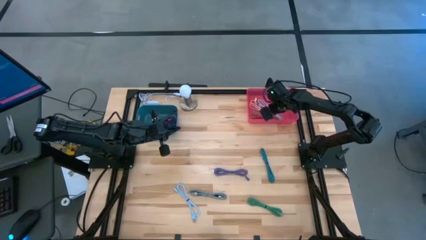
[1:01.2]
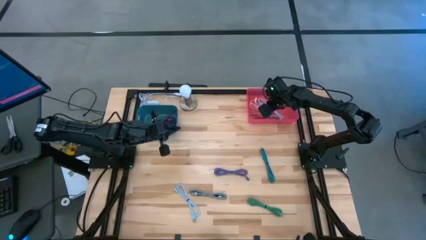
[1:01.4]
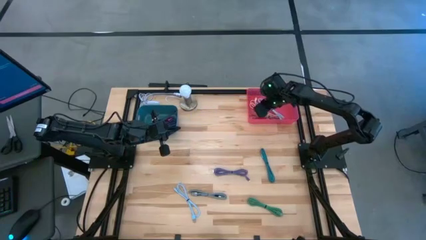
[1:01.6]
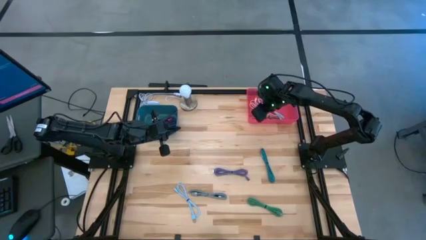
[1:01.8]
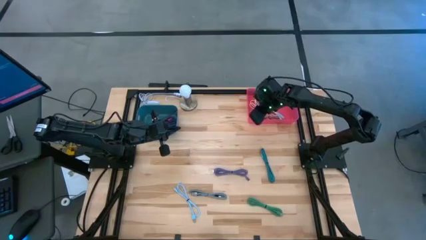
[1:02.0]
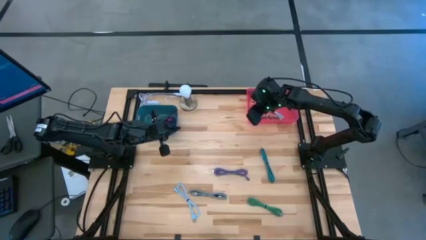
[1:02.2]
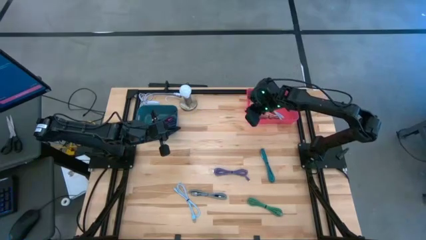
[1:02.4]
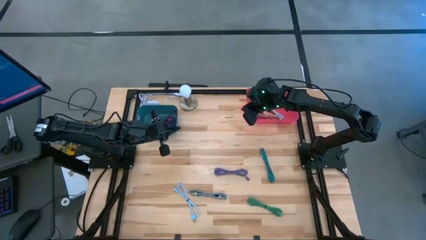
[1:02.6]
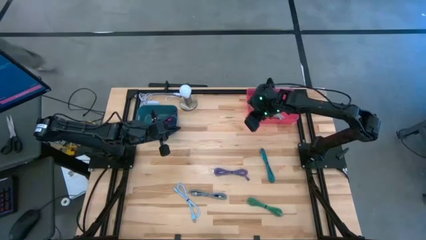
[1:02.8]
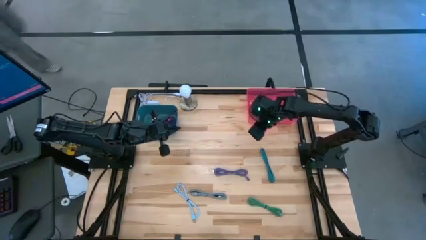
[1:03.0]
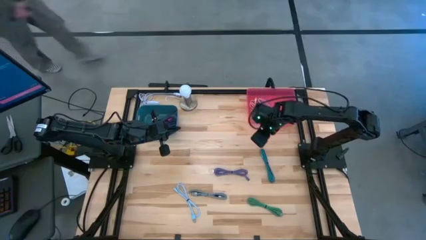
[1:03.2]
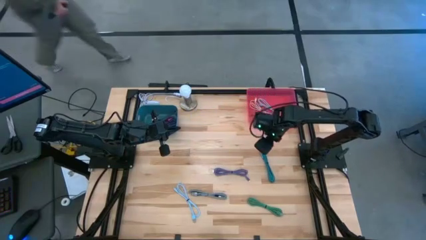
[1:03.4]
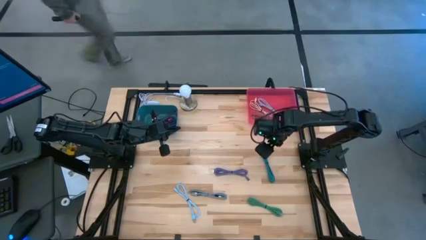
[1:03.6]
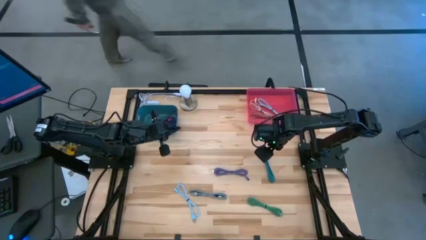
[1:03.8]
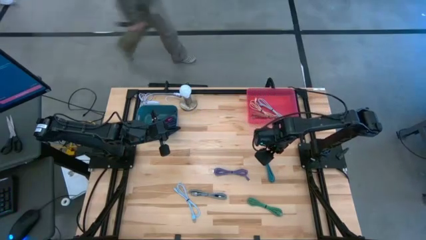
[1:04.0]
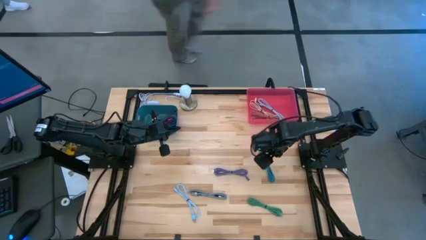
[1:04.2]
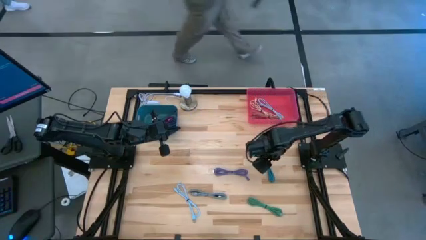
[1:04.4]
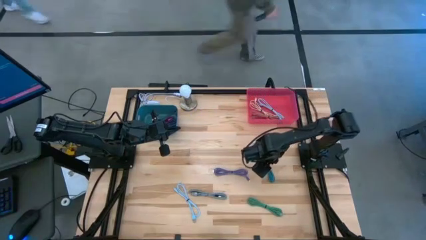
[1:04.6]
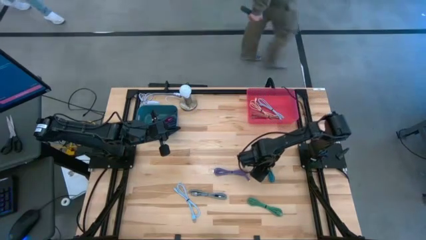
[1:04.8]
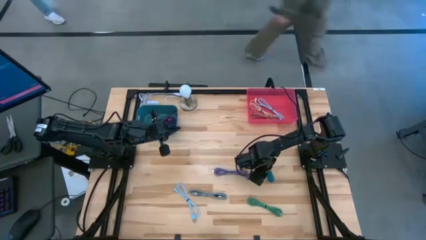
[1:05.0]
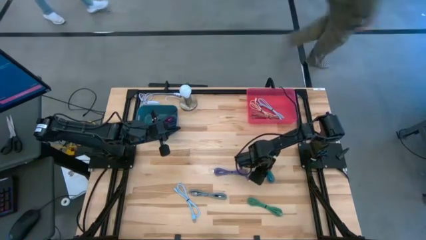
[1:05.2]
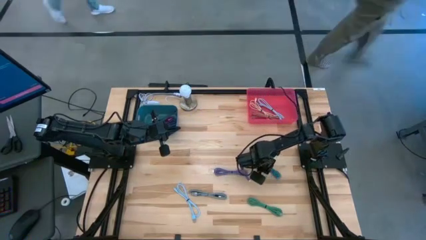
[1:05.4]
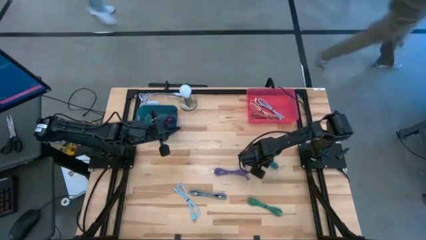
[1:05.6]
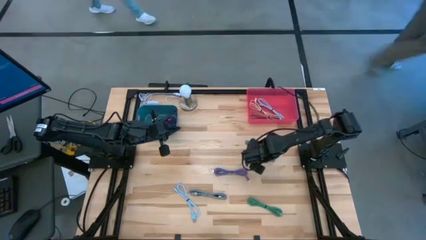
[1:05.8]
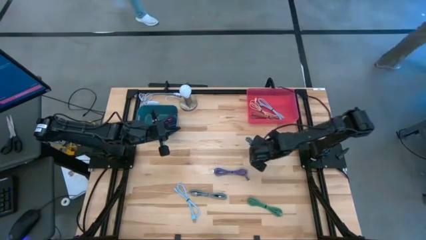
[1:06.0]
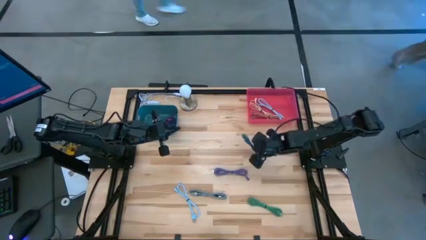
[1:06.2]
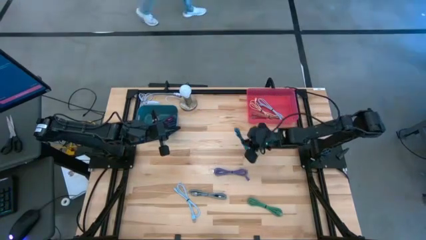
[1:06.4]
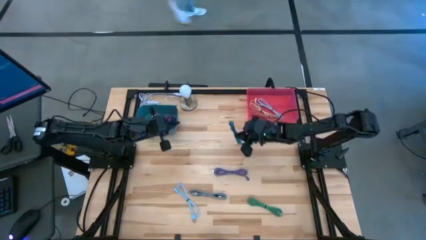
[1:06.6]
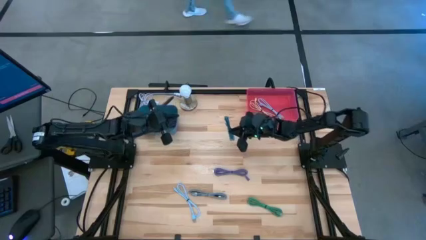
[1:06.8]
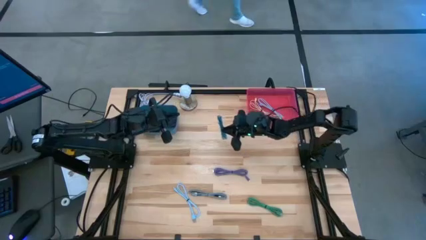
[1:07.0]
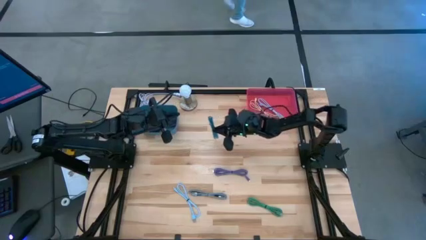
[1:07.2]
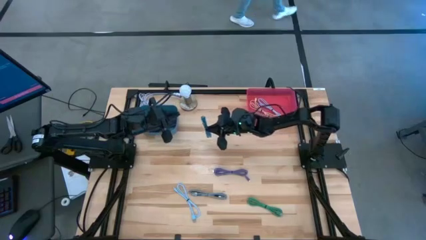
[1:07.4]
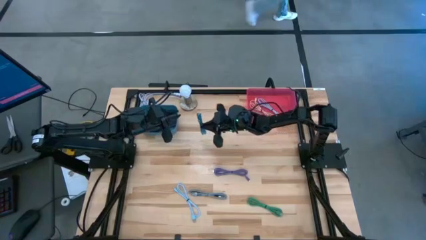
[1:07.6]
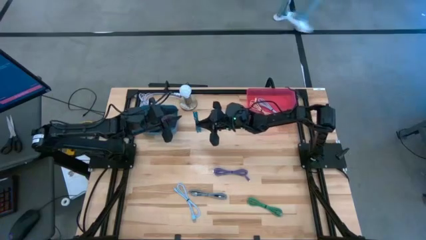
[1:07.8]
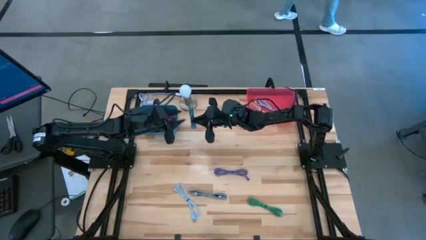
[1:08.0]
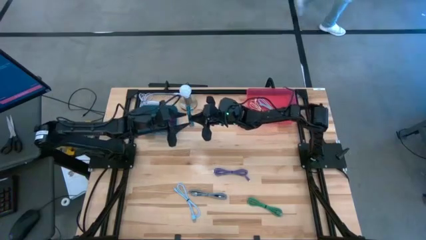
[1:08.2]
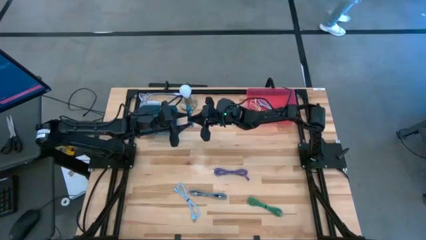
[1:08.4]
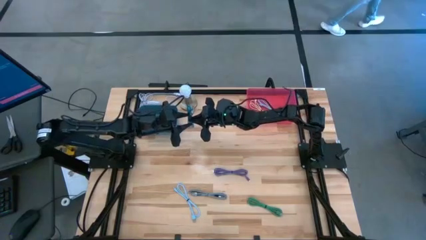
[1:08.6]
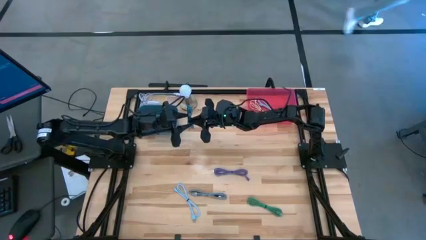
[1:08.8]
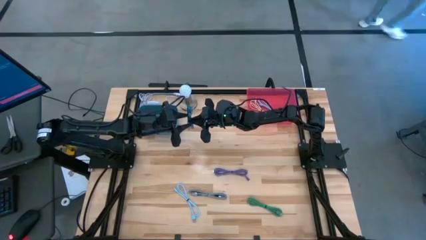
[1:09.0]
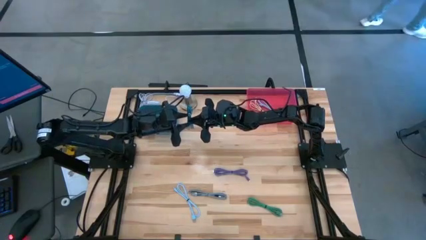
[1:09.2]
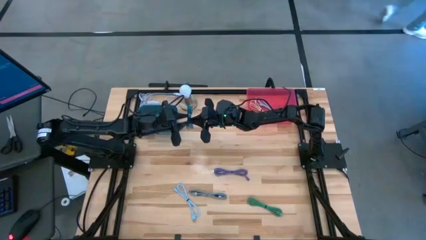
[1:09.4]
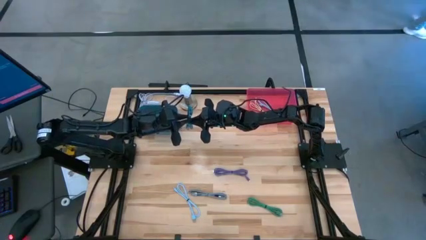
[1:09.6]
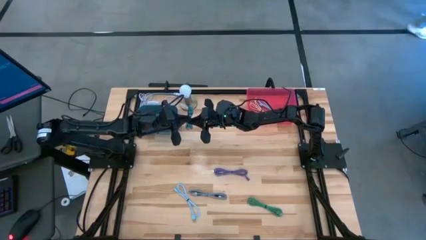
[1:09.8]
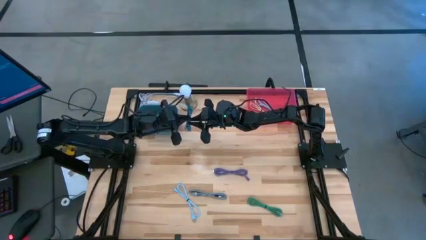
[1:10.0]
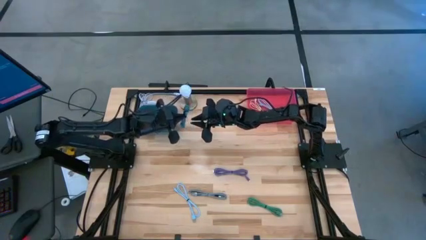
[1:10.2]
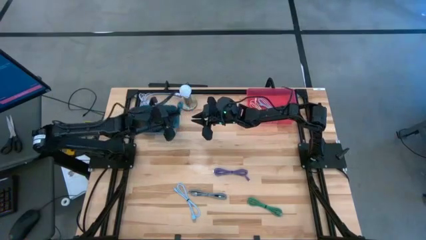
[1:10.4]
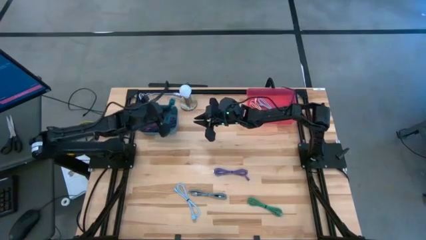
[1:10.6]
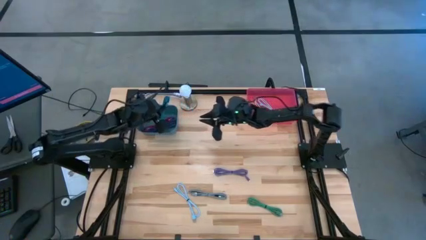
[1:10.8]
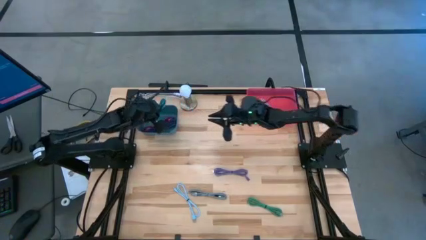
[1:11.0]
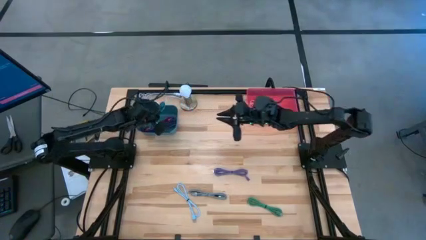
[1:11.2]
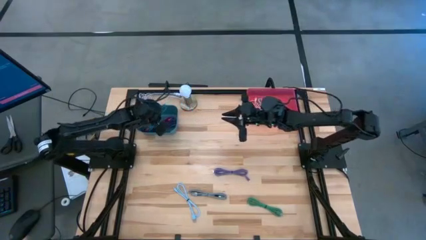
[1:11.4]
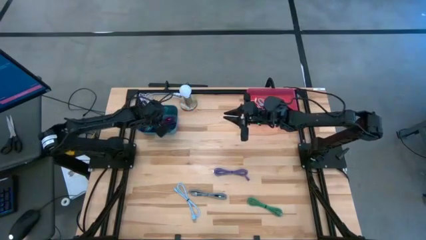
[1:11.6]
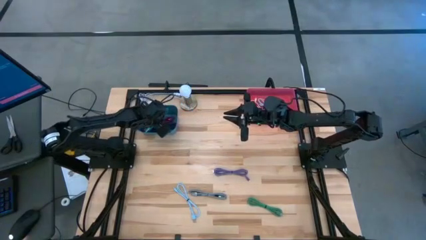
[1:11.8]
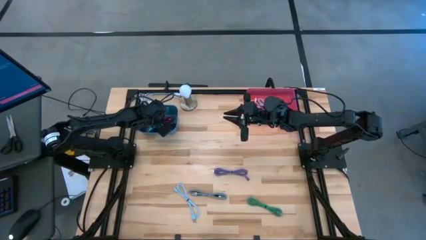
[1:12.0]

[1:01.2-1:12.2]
Task: Pick & Place USB Port
Put the striped blue and black charger cable into the blue bin

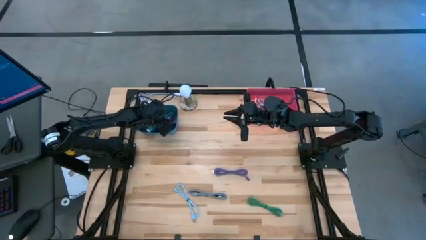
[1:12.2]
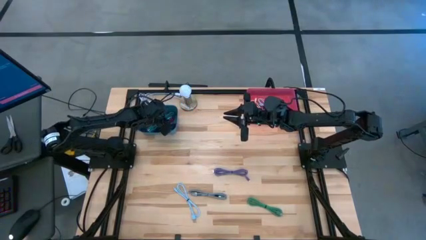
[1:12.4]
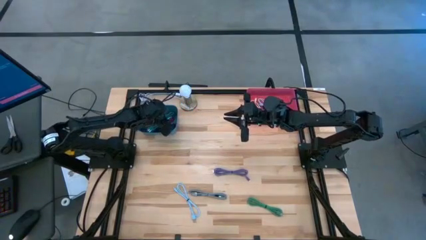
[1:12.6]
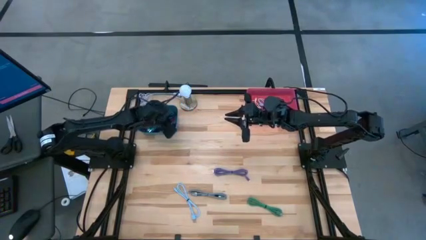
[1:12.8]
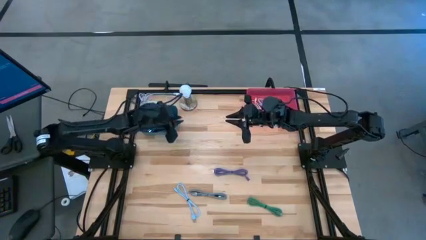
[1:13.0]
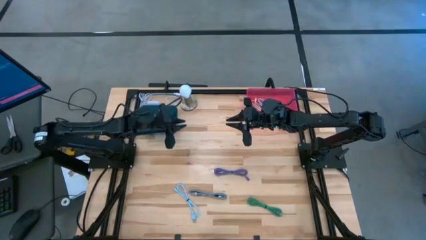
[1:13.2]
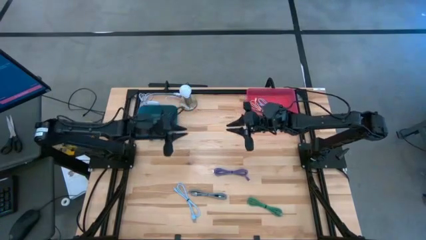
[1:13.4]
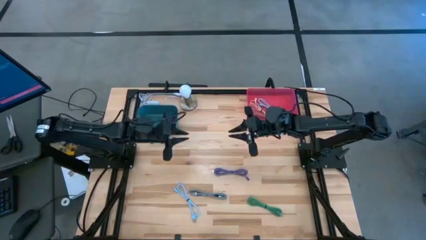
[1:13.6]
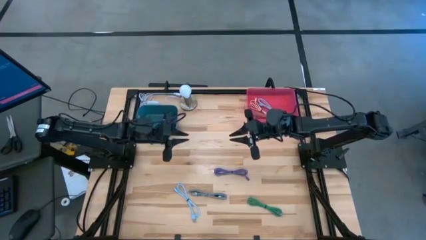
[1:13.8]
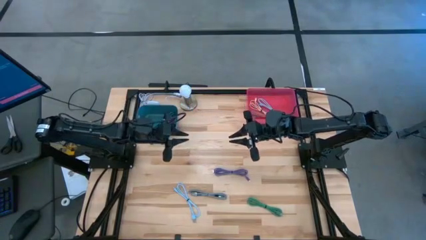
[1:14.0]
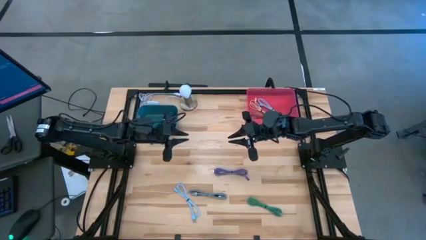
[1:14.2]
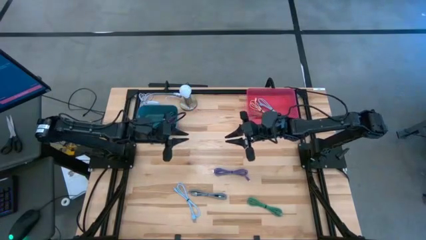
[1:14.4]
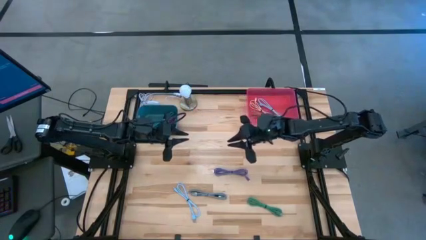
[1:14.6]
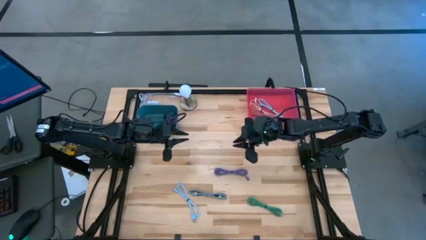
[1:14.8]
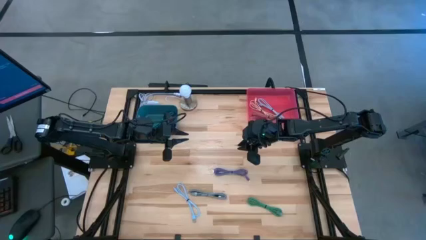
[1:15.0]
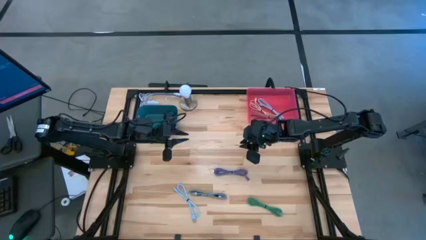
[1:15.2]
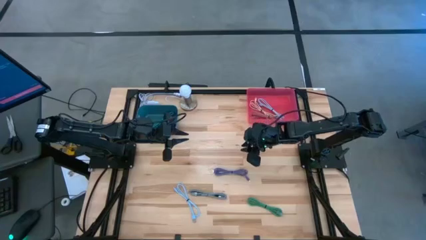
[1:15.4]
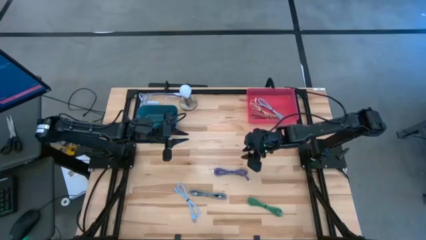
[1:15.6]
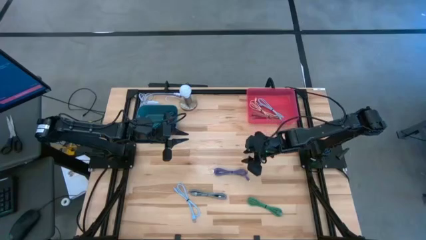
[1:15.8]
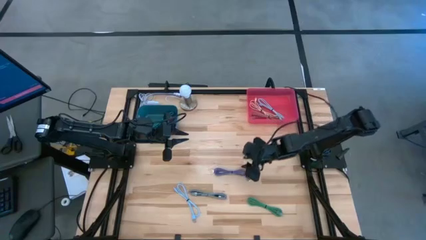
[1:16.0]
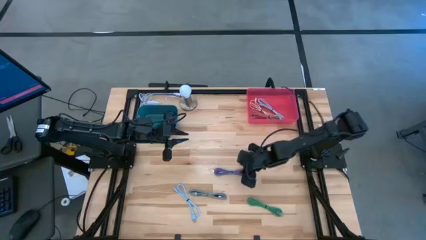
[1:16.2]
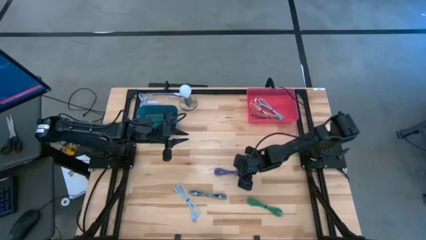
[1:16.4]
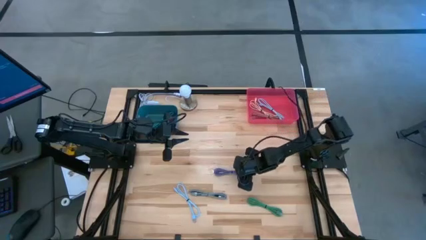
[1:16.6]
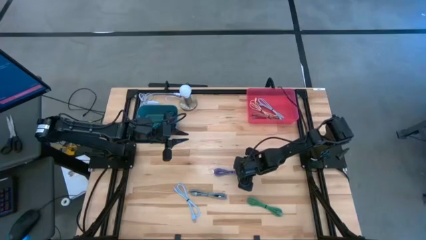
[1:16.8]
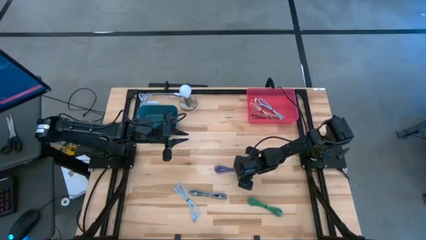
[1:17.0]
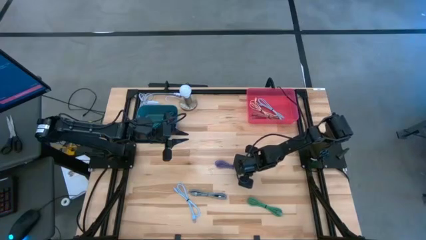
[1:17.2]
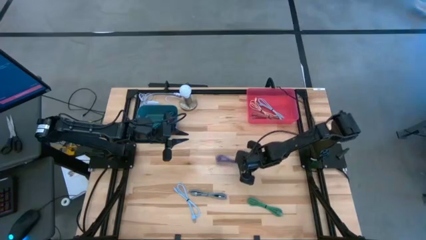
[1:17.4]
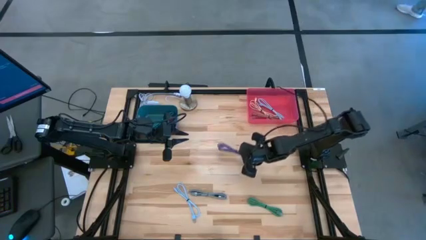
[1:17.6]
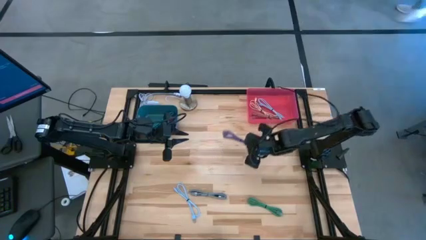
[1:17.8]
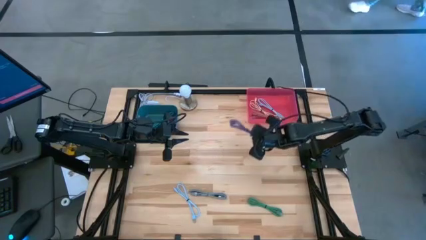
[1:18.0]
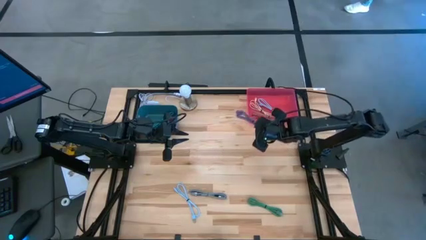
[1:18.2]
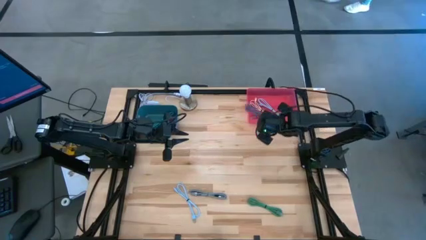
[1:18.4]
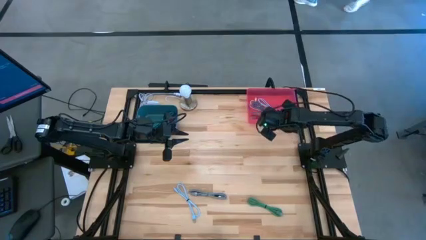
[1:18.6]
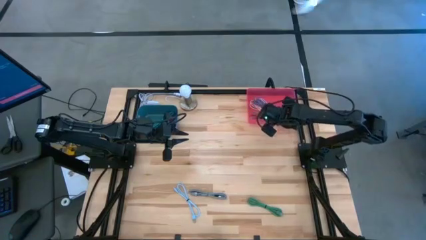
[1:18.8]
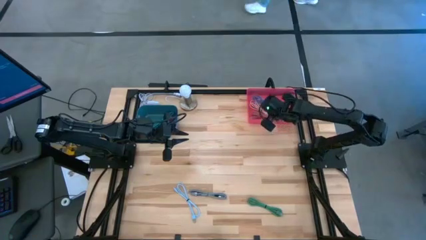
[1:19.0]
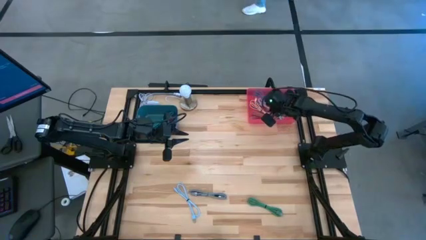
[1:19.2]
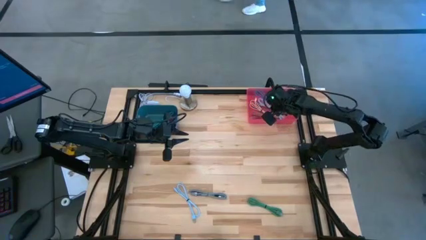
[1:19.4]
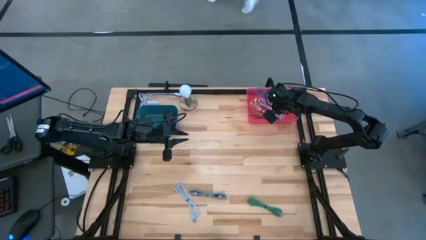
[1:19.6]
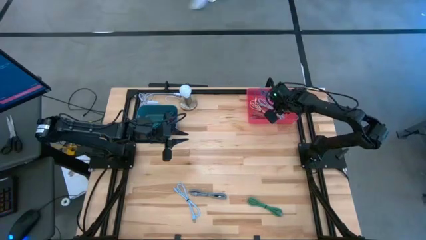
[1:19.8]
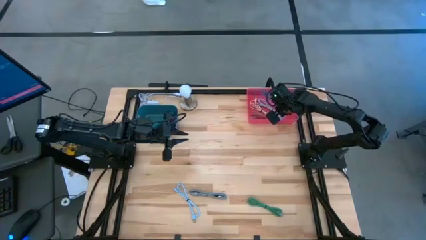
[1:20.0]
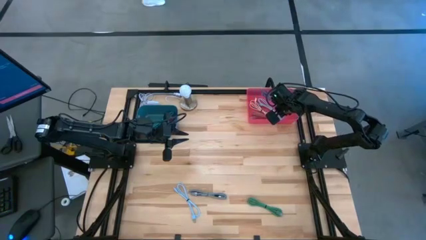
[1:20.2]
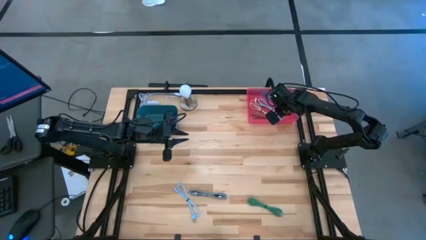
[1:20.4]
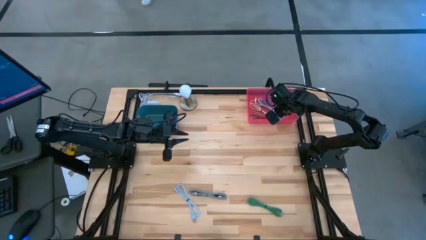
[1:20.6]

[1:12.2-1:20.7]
Put the plain purple charger cable into the pink bin
